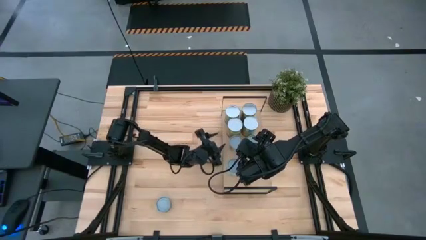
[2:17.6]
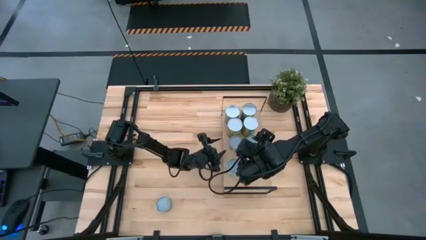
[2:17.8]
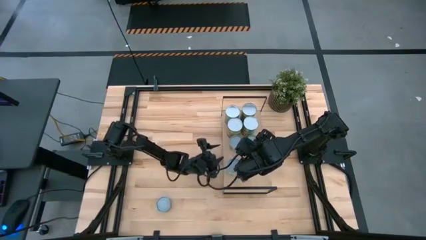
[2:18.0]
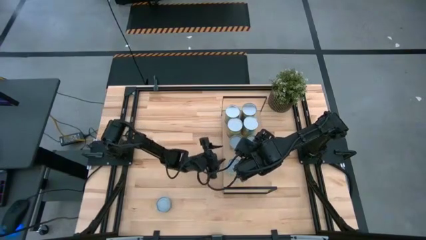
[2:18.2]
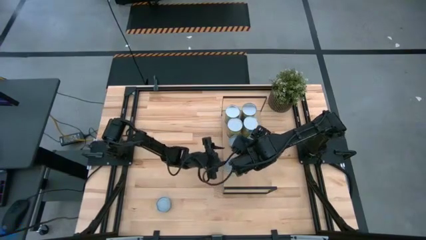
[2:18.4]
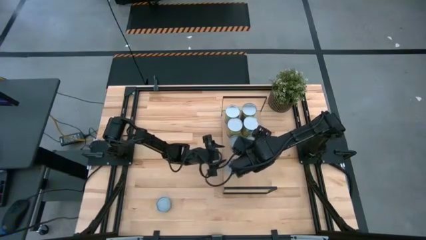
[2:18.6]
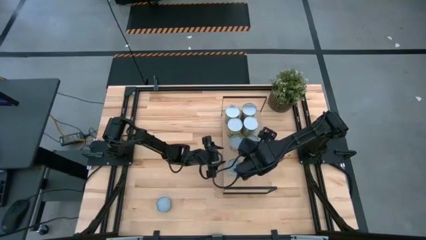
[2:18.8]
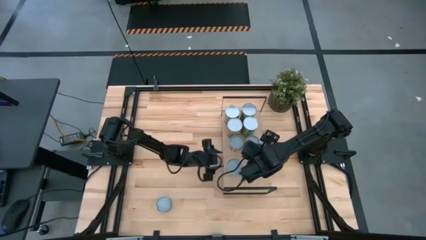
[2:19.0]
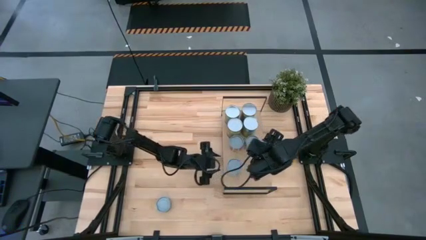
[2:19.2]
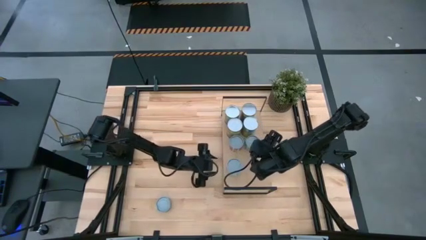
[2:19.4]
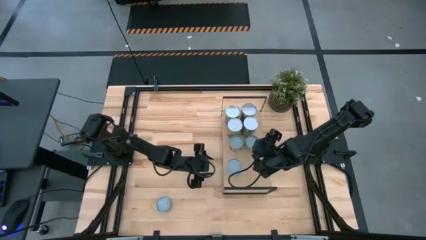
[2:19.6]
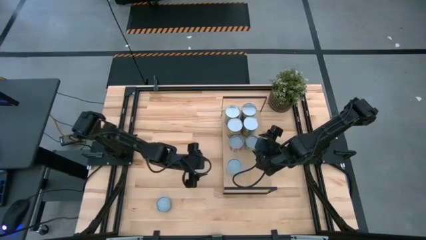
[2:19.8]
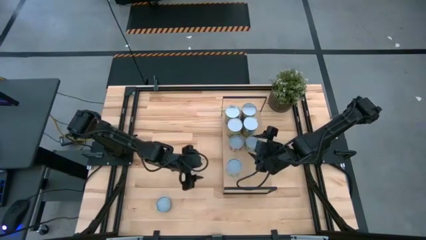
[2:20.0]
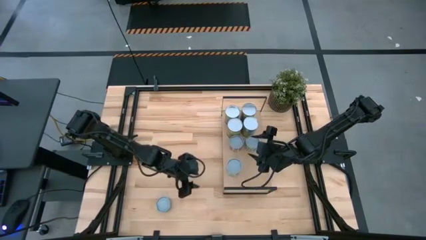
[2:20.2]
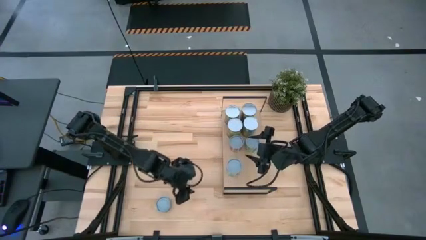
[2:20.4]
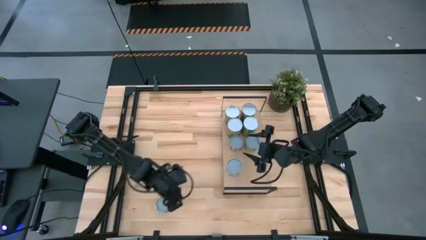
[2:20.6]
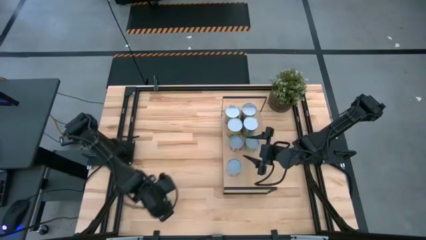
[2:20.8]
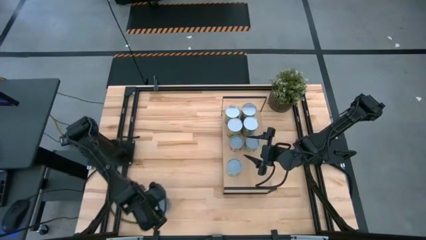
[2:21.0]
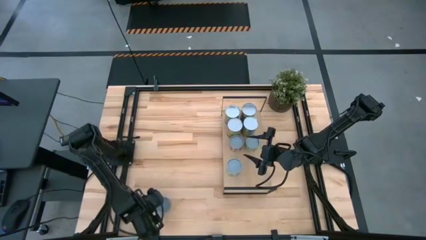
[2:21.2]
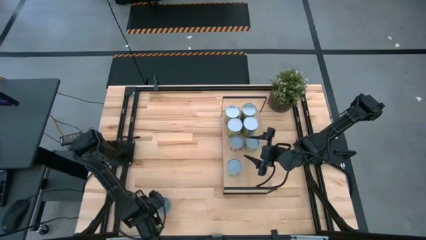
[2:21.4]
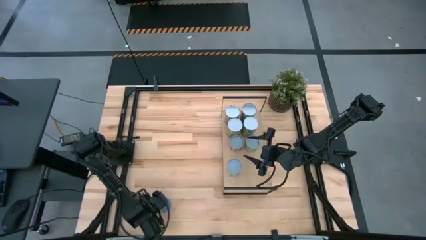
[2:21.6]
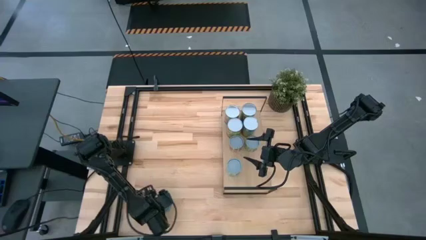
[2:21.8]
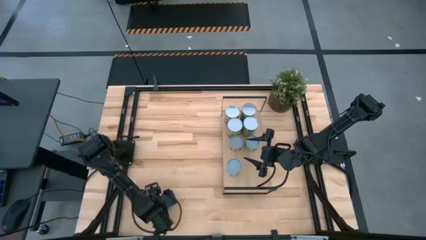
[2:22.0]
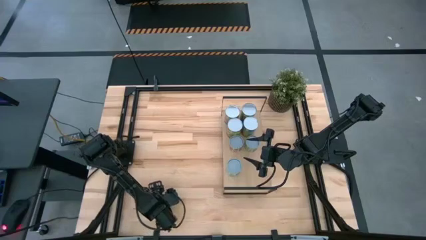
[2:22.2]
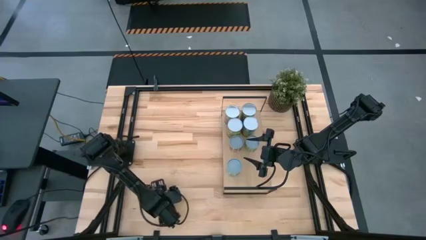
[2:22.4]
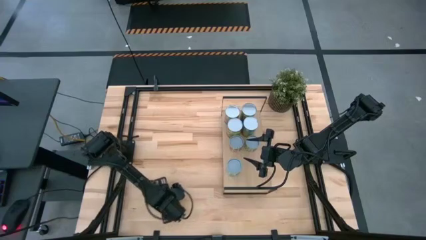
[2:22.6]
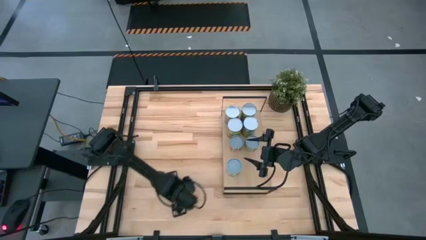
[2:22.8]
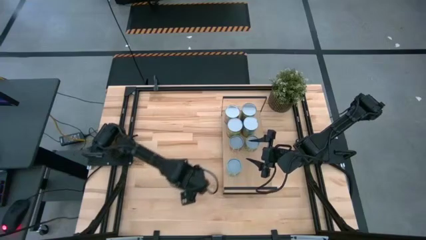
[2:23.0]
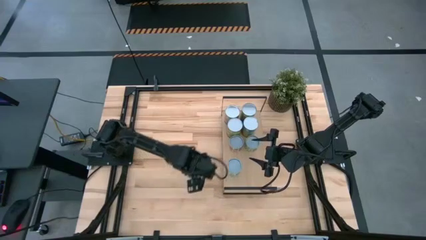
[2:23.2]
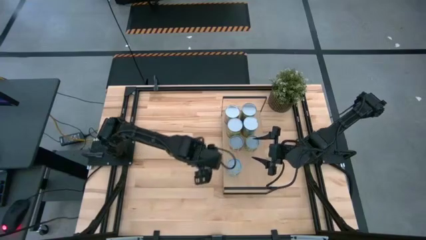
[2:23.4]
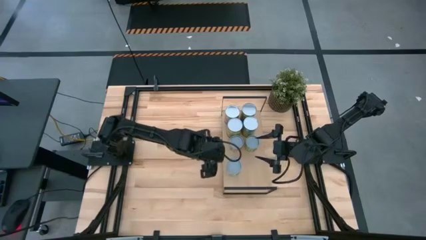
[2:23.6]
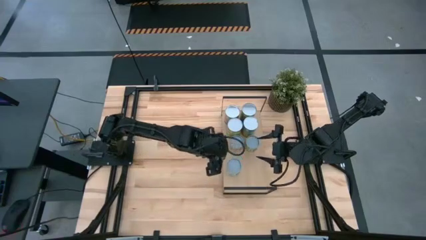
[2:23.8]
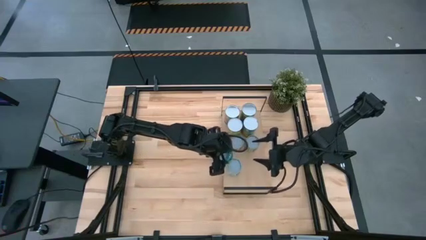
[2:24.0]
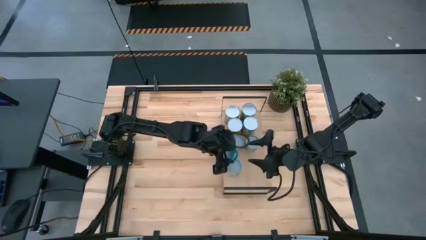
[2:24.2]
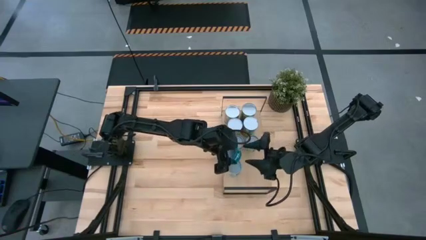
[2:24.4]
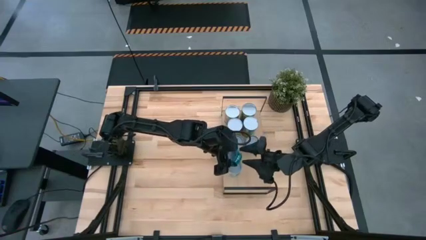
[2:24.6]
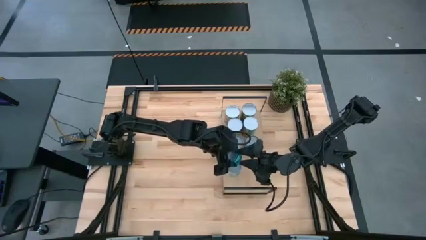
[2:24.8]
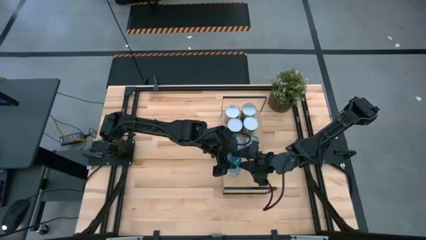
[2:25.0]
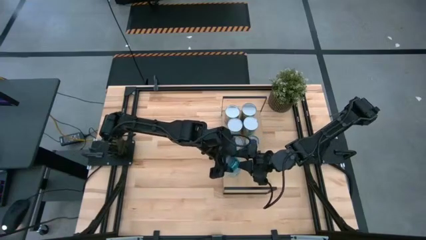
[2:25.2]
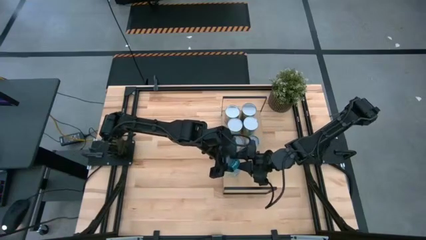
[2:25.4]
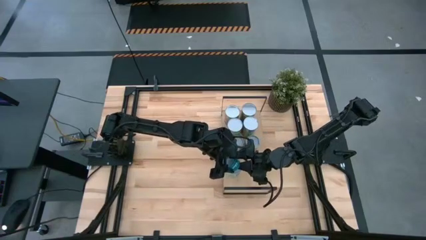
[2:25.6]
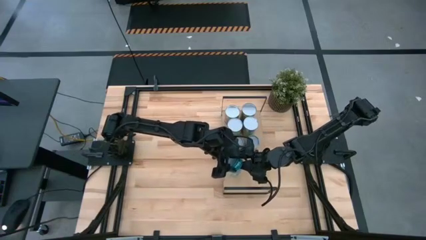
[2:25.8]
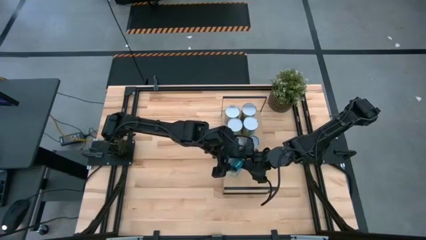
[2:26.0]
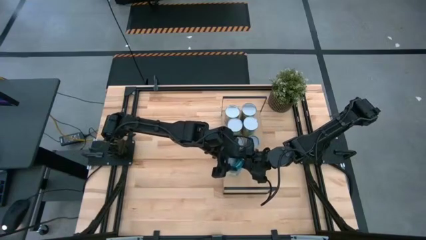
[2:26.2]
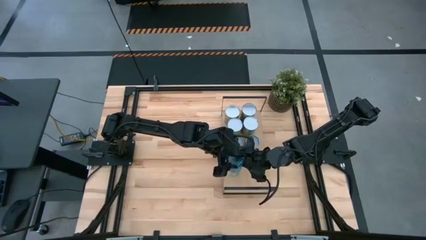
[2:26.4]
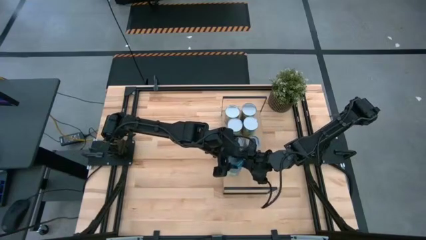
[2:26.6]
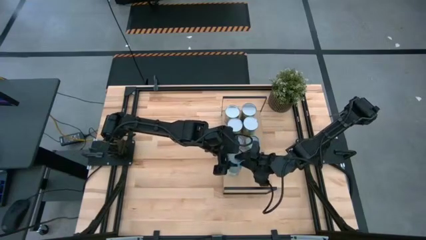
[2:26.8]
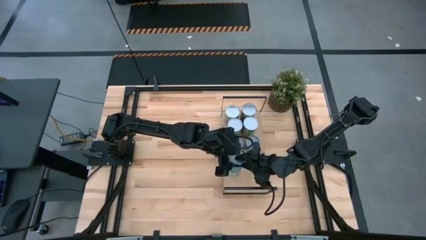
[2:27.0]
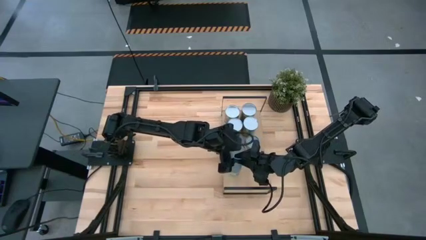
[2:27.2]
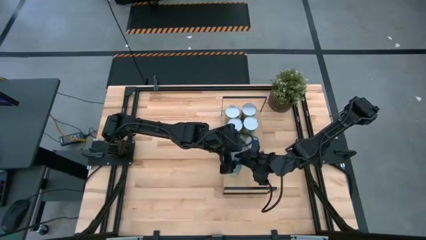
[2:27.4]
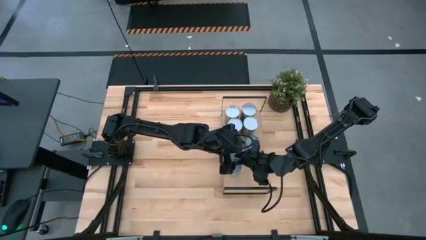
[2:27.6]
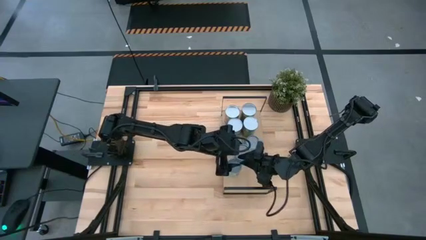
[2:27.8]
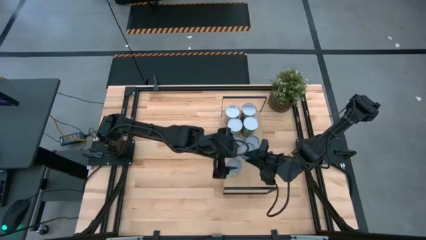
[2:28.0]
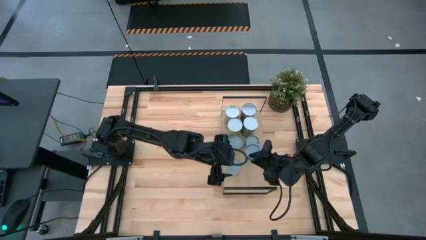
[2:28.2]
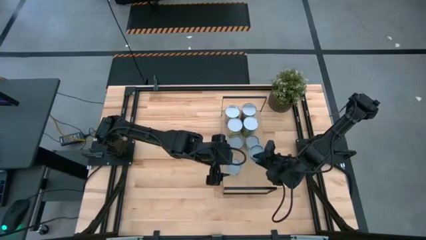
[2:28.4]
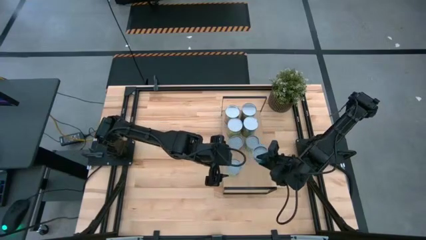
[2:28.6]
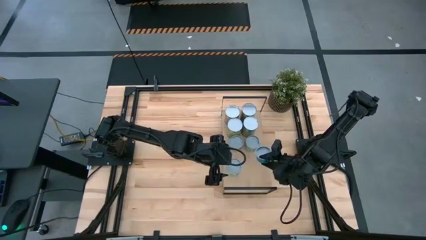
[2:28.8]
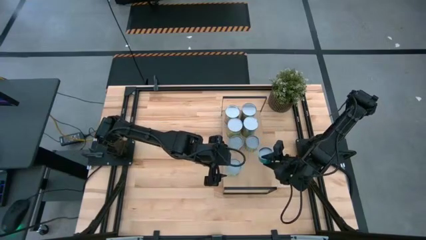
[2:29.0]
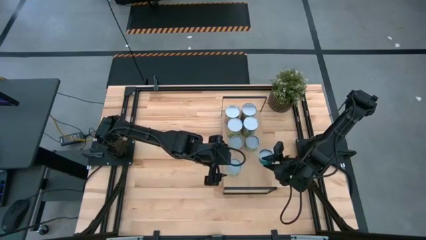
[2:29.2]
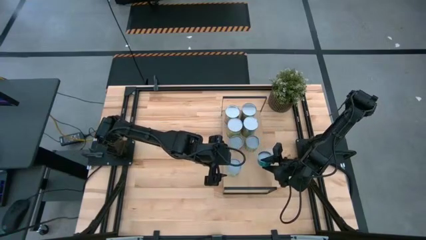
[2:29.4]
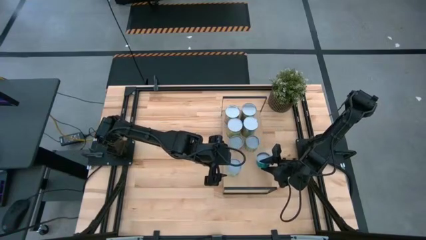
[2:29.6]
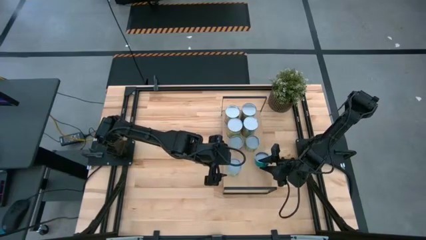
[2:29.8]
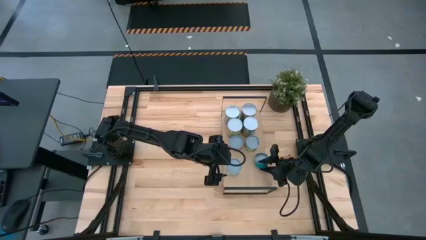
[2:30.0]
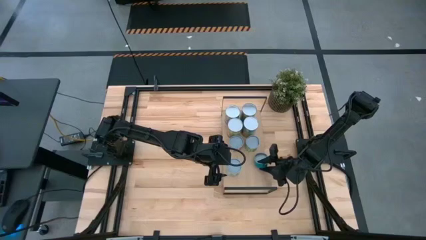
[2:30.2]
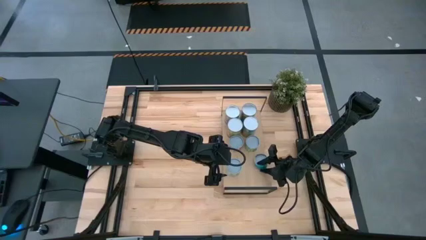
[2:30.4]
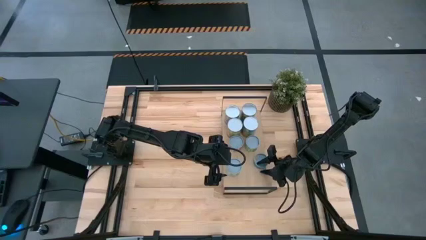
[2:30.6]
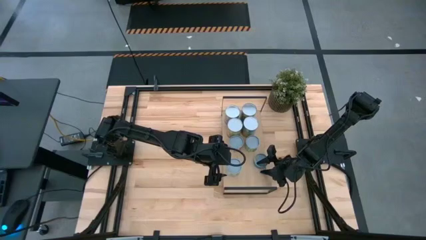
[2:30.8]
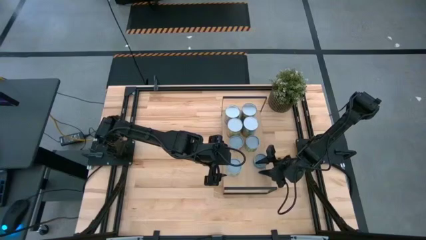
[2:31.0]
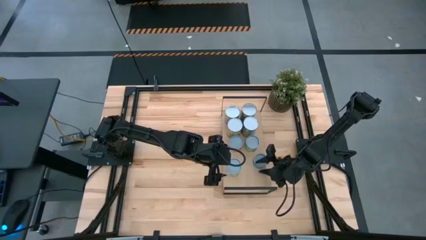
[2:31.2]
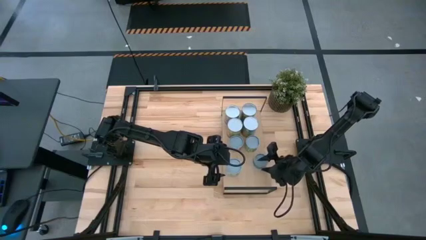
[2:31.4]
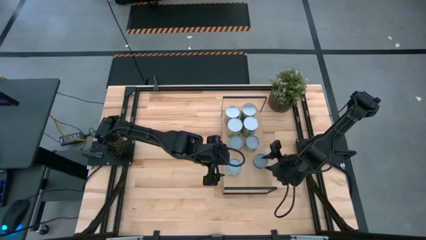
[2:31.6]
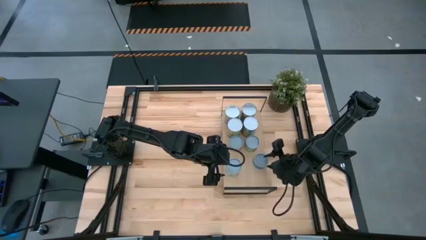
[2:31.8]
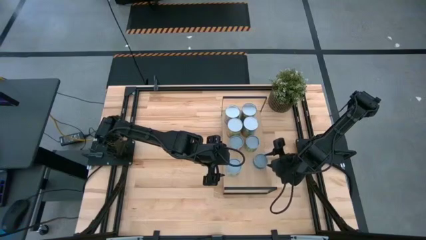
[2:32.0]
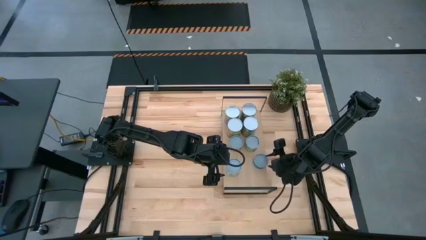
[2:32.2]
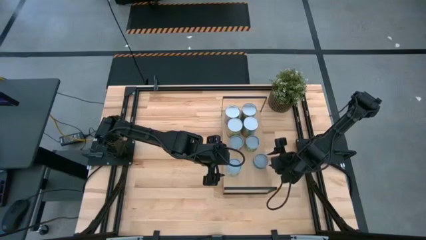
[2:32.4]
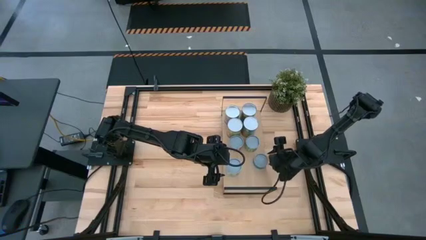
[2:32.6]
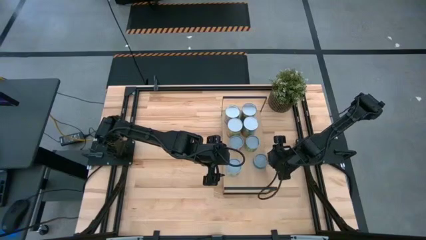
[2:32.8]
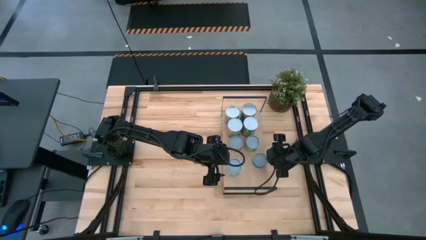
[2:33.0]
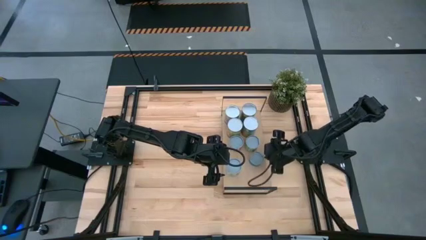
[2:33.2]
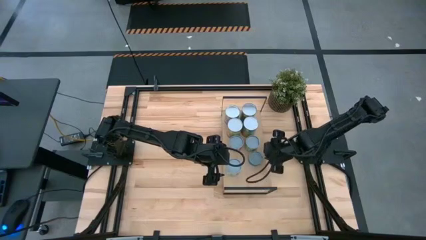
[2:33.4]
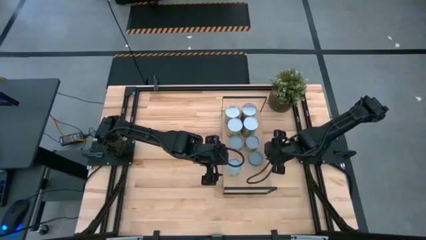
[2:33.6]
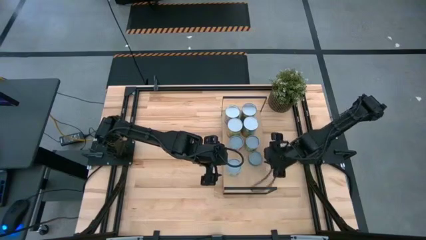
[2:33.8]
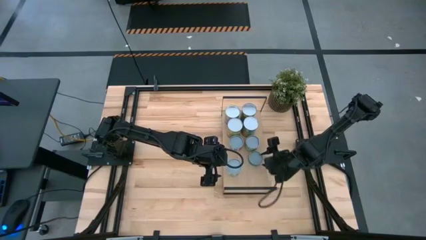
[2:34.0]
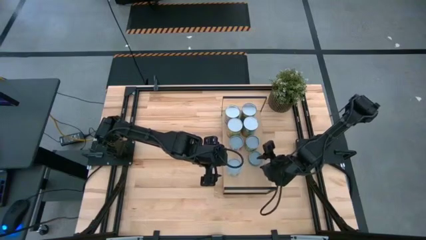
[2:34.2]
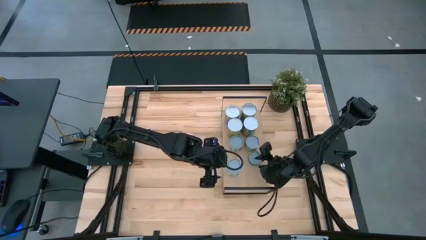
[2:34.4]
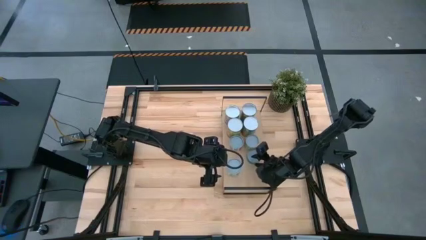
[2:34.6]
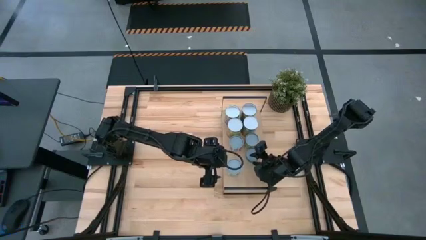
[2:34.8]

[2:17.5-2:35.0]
Task: Pick and place cans onto a shelf
Put the canned tuna can on the shelf
